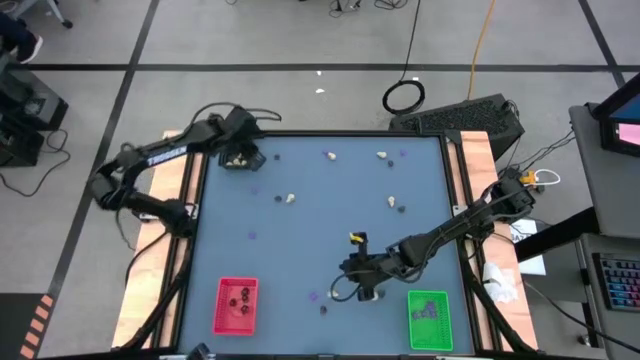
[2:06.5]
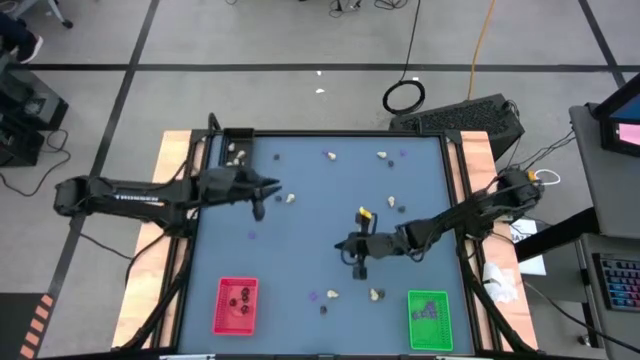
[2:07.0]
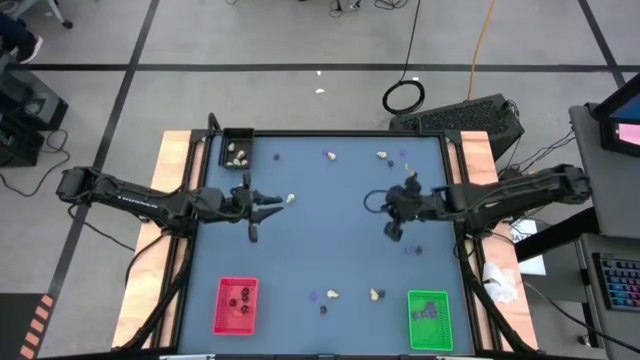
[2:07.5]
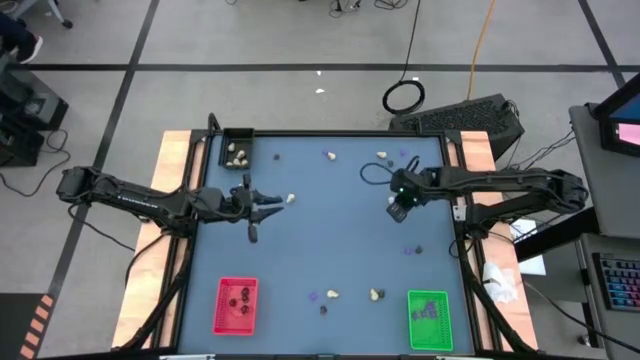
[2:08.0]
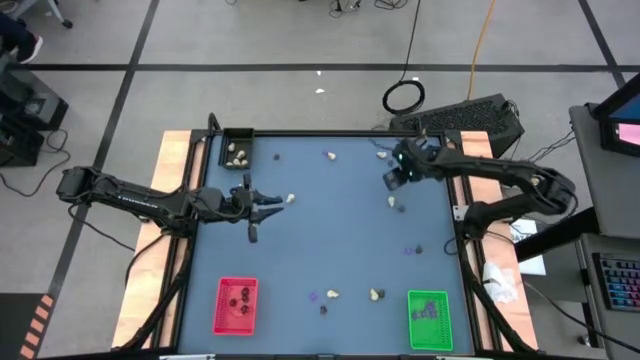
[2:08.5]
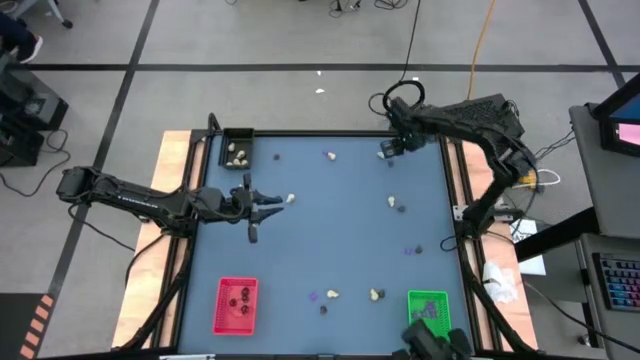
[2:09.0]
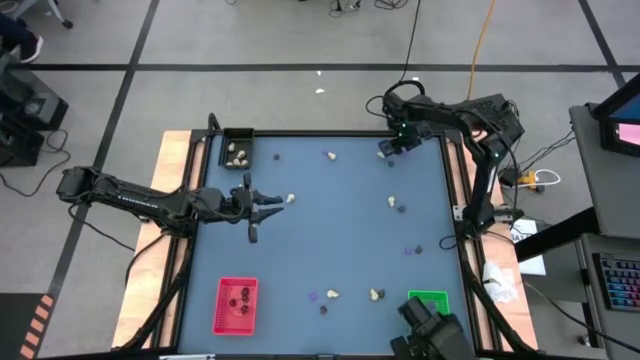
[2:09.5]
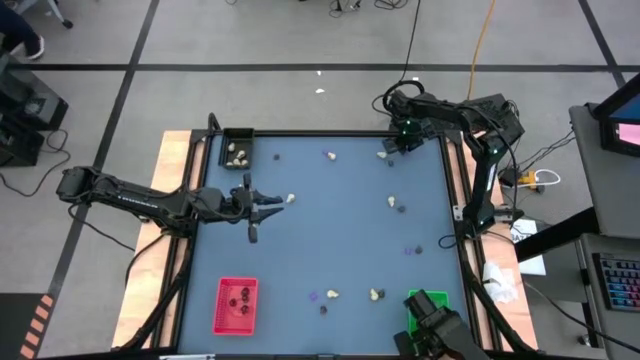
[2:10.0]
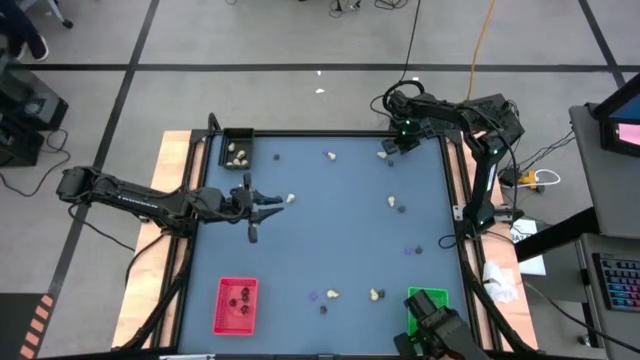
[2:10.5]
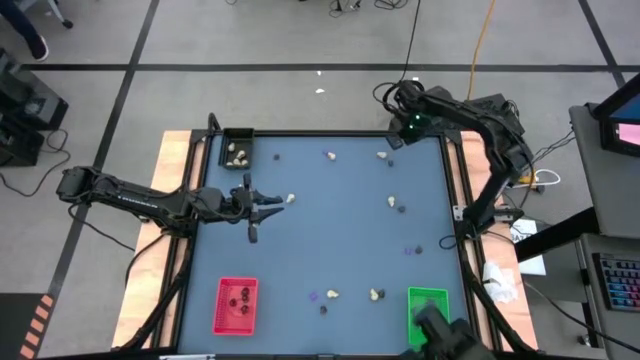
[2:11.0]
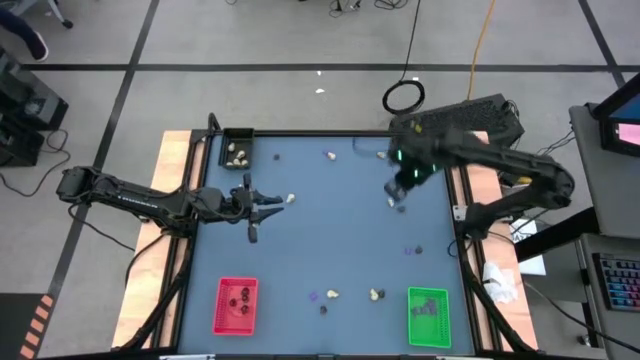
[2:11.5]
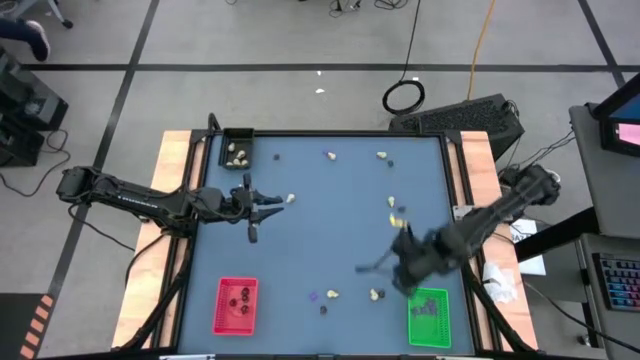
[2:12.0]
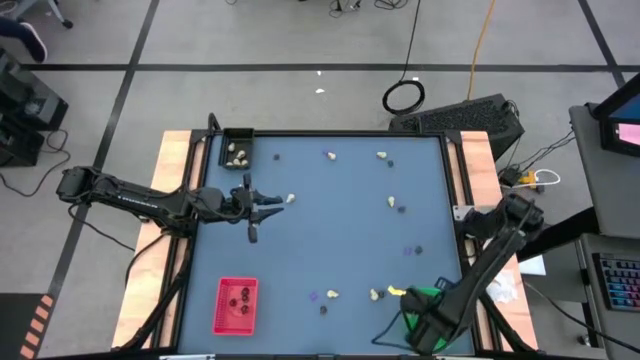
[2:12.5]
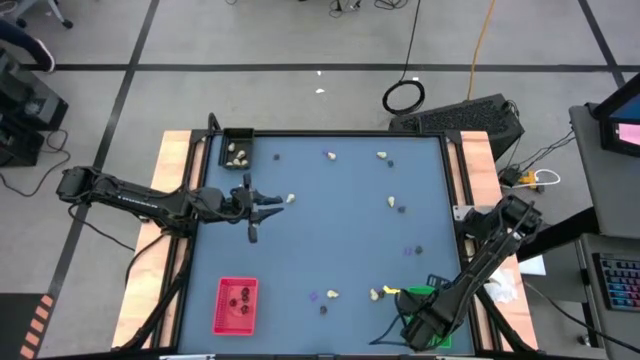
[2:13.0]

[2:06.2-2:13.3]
Task: Sort Halloween decoration
Put the violet spider toy into the green bin

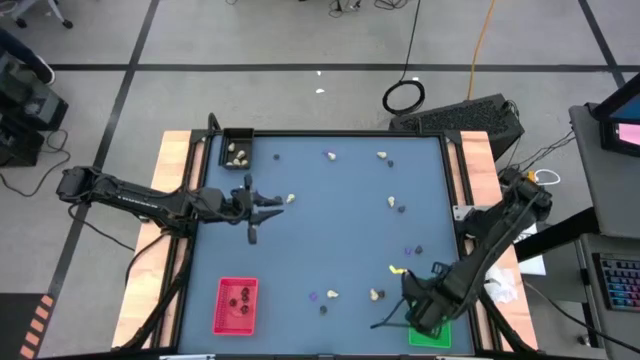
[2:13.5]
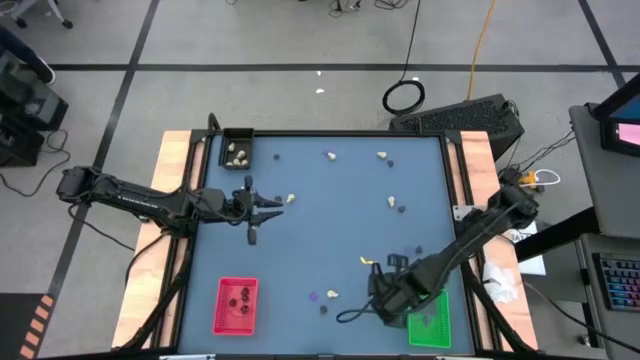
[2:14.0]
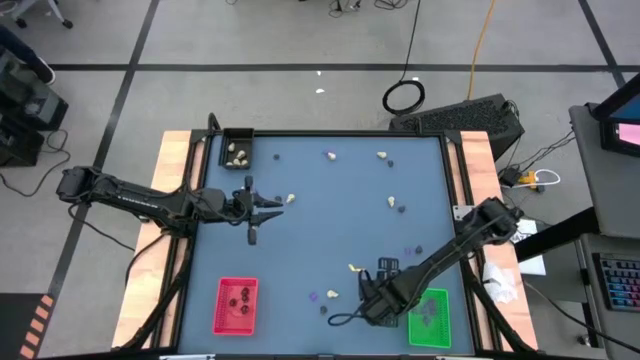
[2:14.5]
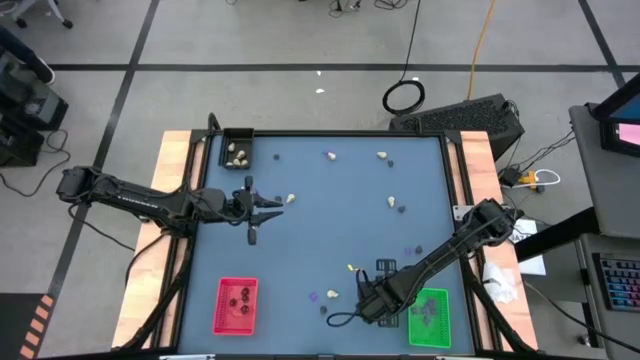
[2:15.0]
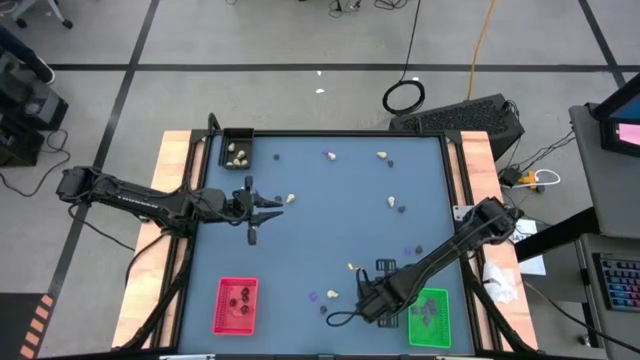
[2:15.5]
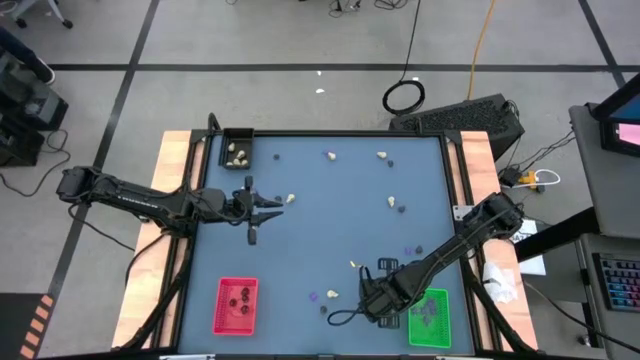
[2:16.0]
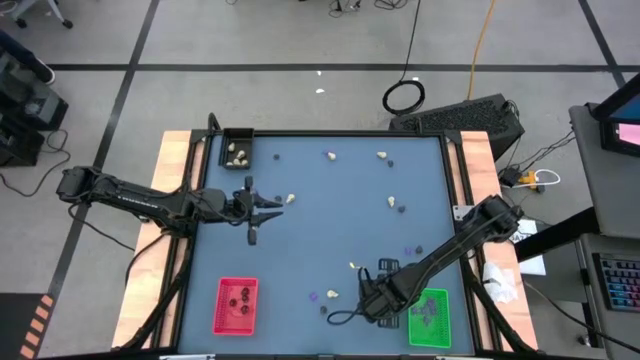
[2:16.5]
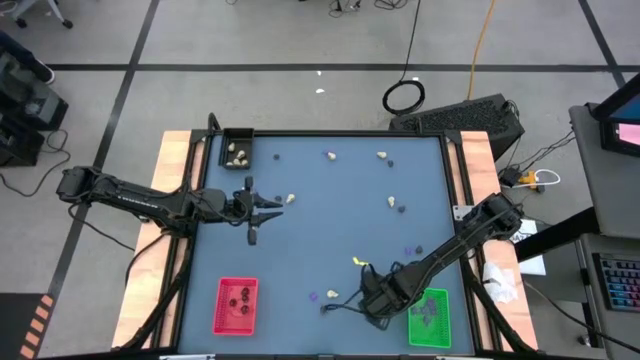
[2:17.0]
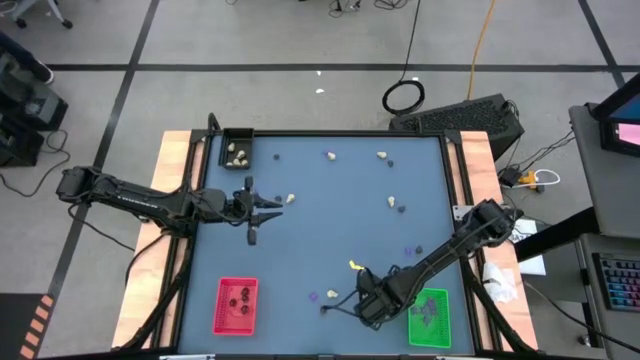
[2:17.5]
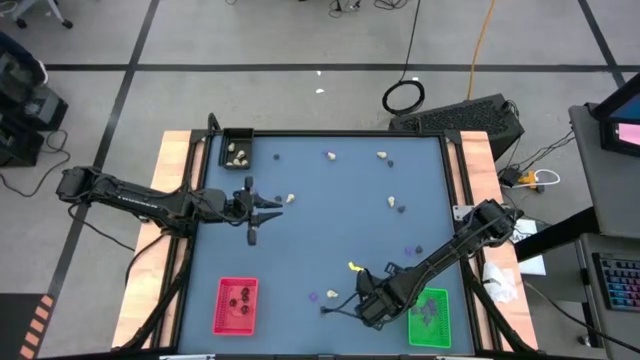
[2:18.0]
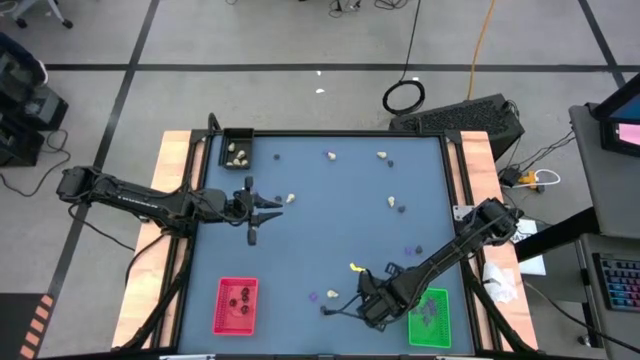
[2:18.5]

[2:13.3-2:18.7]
Put the black skull toy into the red bin

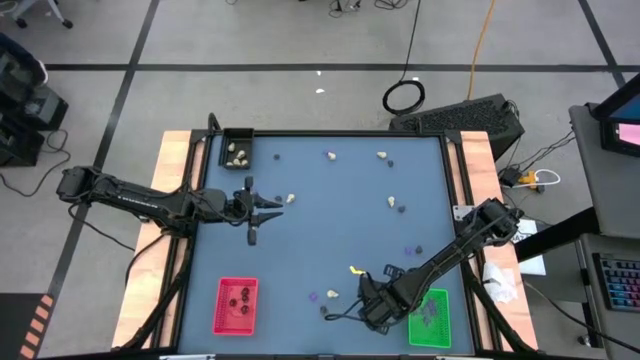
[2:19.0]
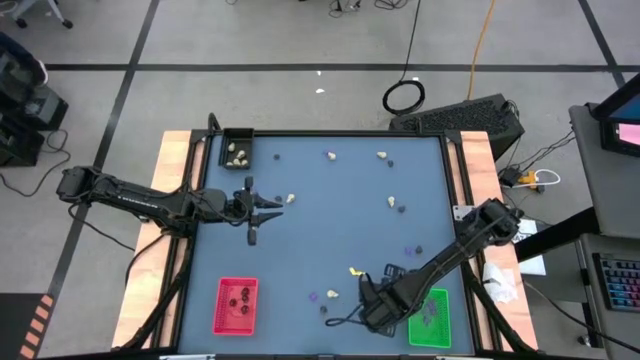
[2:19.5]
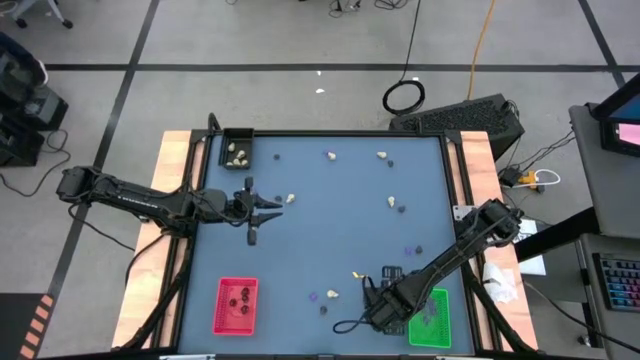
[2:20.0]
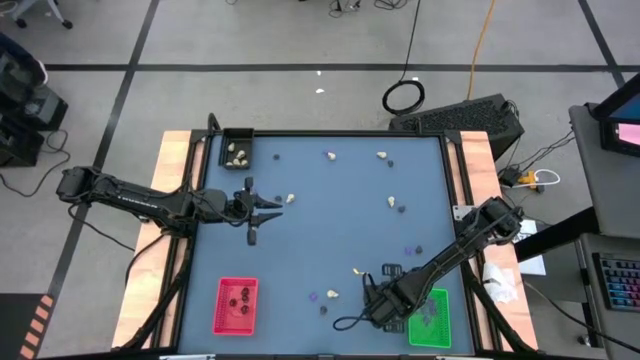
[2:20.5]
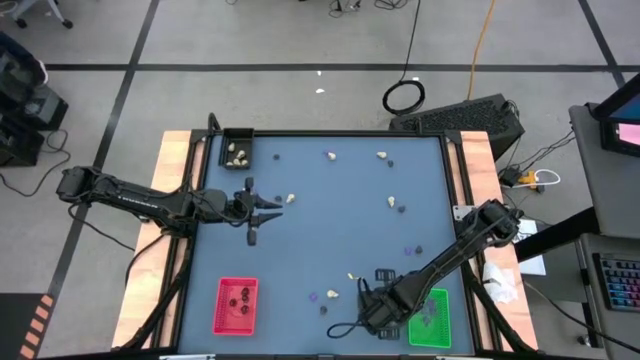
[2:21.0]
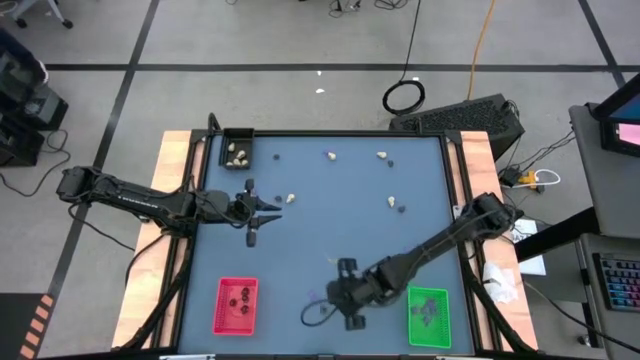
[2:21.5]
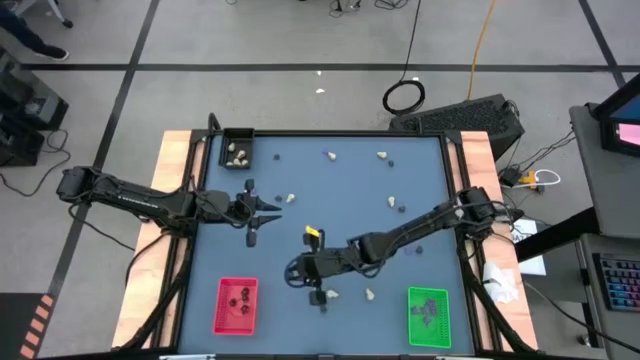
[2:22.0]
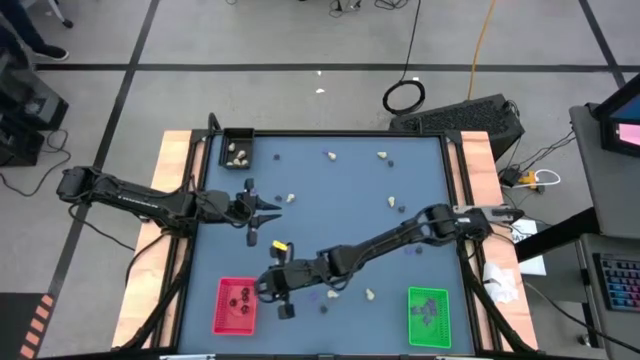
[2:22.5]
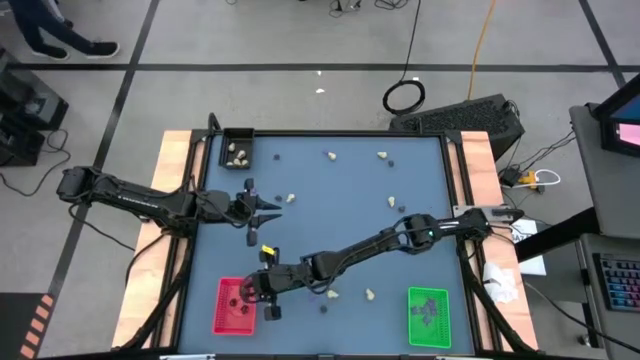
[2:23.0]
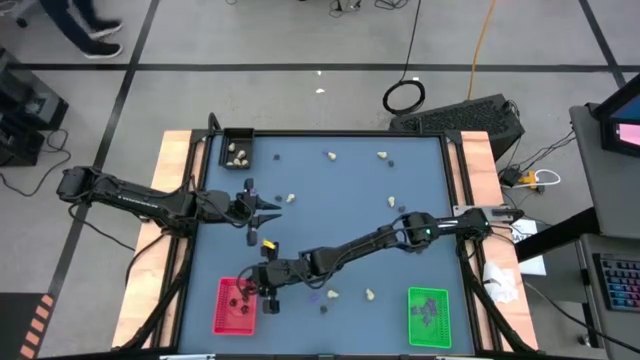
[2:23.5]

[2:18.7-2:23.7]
Put the black skull toy into the red bin

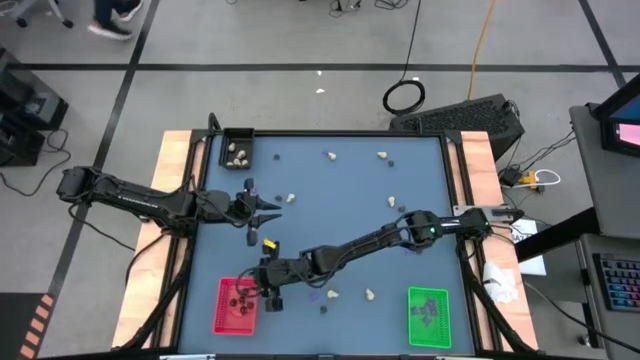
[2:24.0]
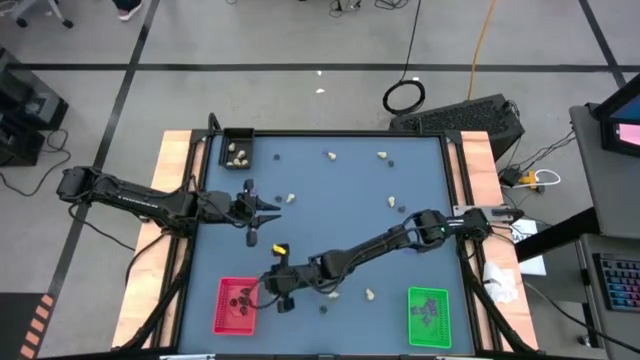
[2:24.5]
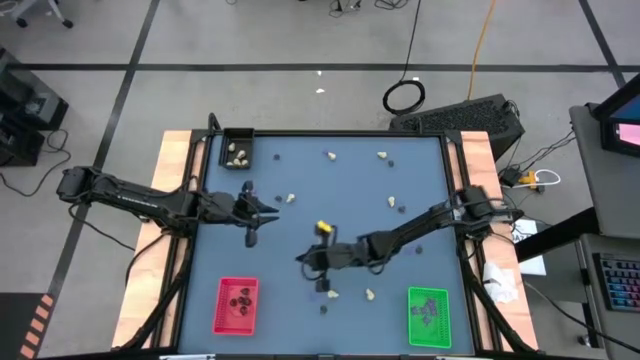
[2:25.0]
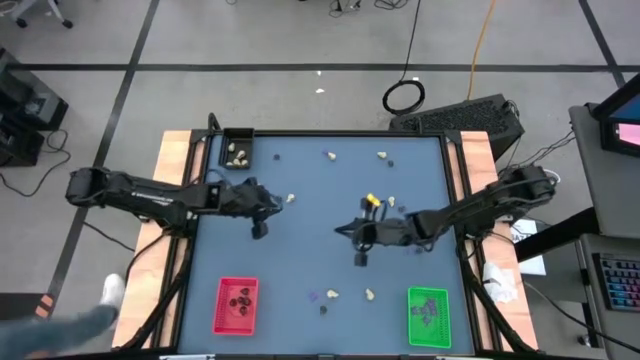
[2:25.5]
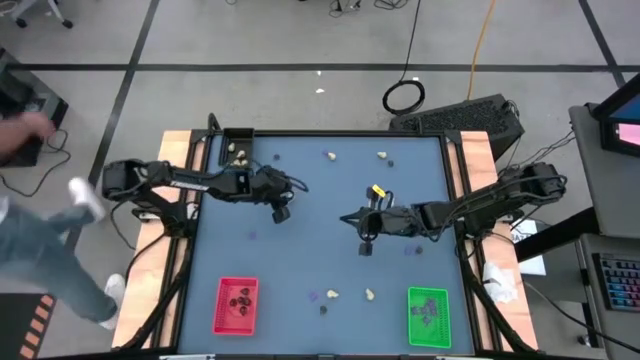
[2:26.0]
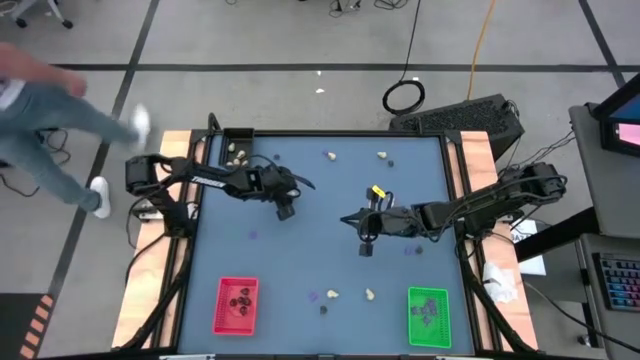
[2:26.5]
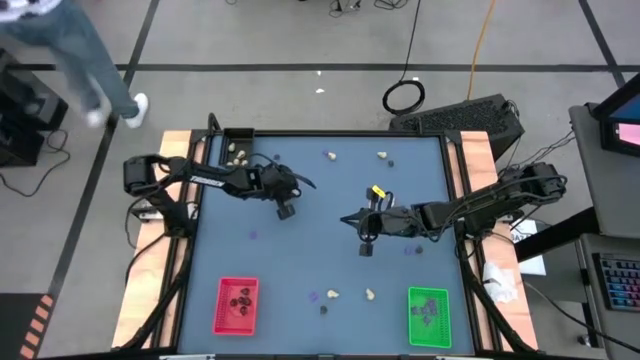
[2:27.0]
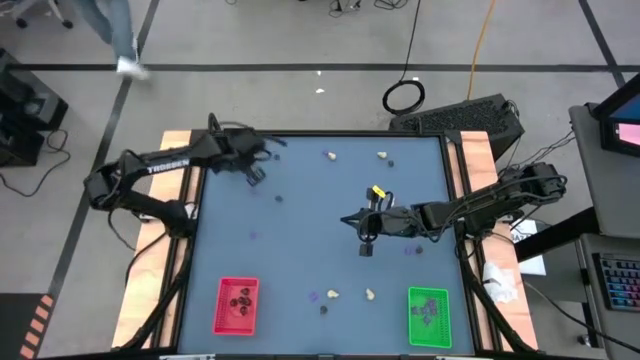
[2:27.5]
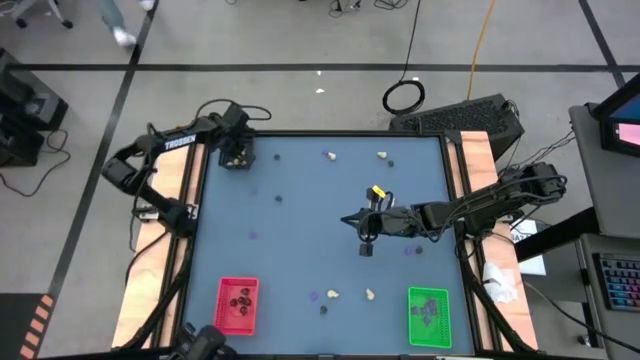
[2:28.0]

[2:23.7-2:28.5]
Put the white skull toy into the black bin
